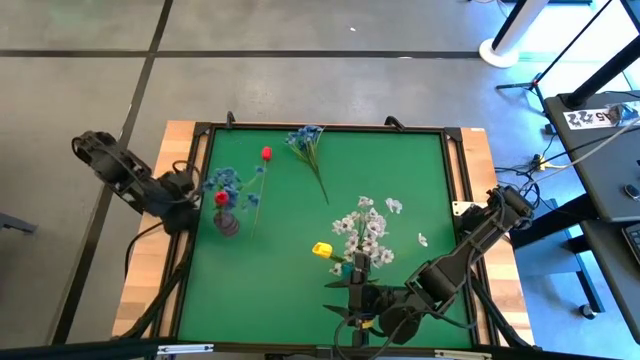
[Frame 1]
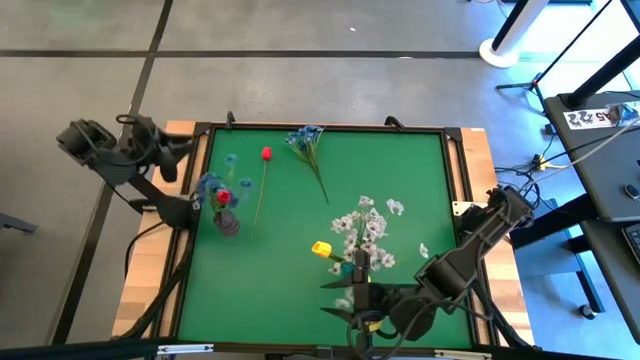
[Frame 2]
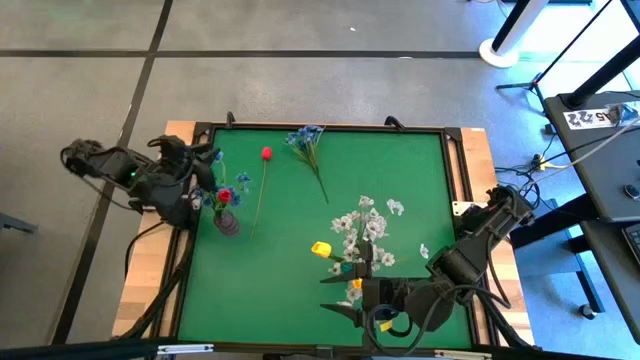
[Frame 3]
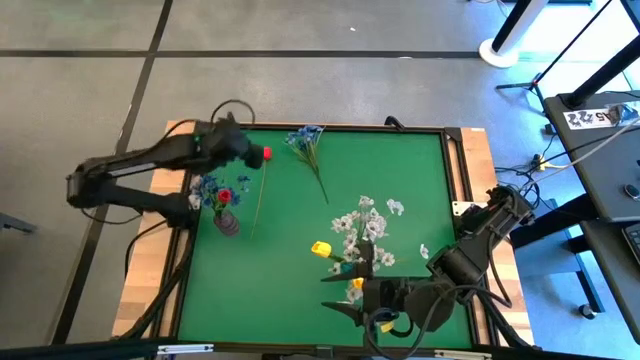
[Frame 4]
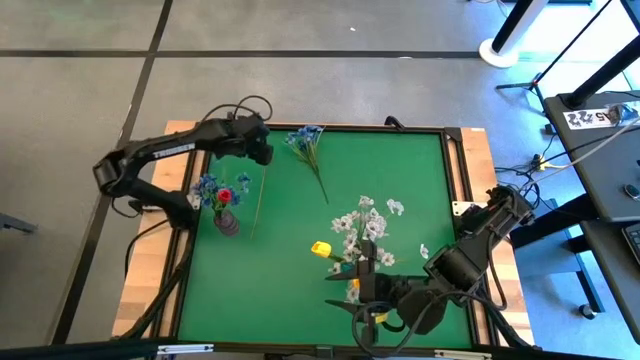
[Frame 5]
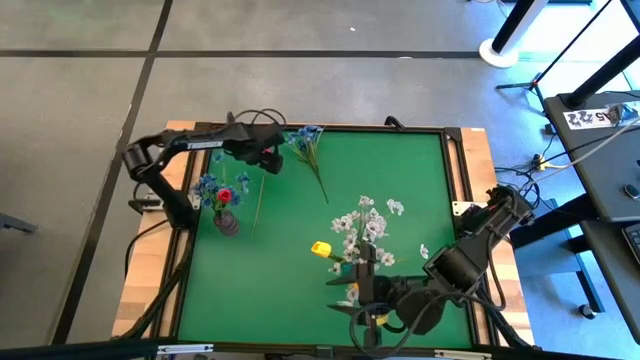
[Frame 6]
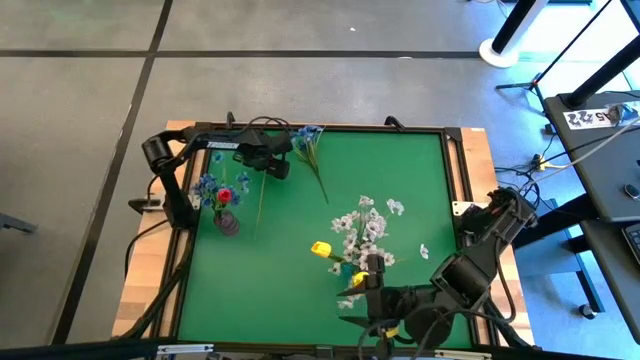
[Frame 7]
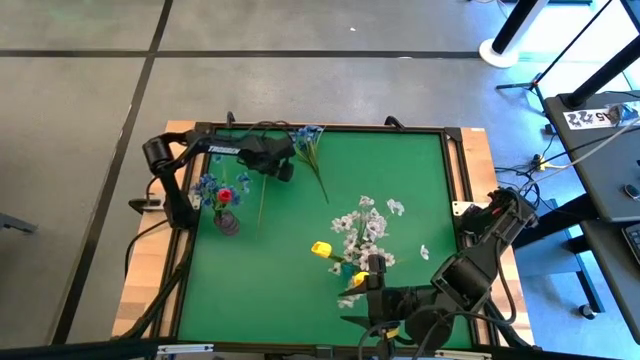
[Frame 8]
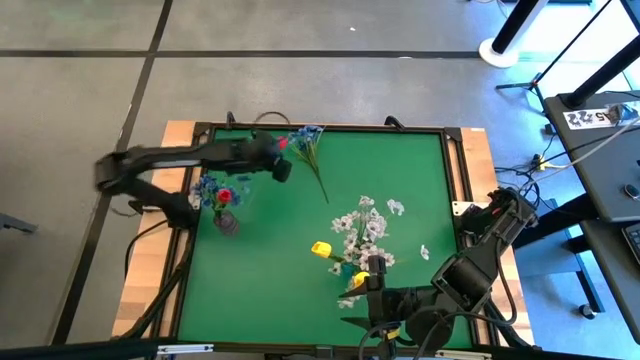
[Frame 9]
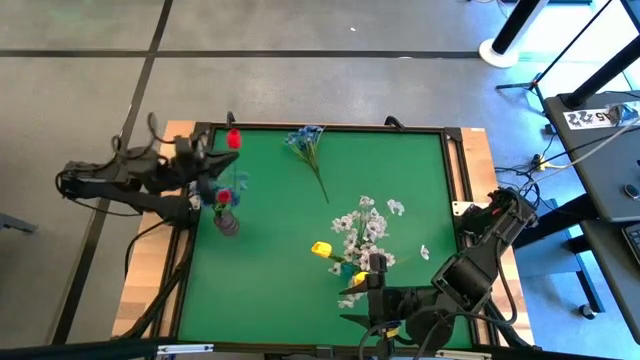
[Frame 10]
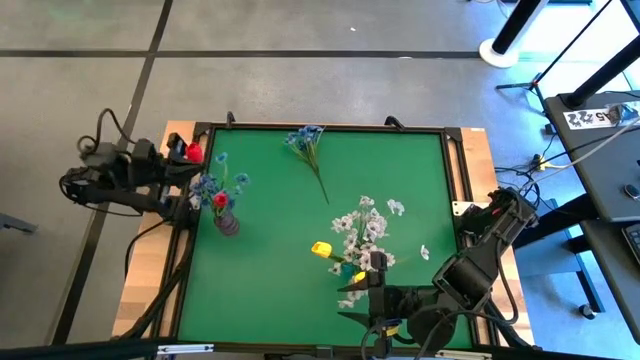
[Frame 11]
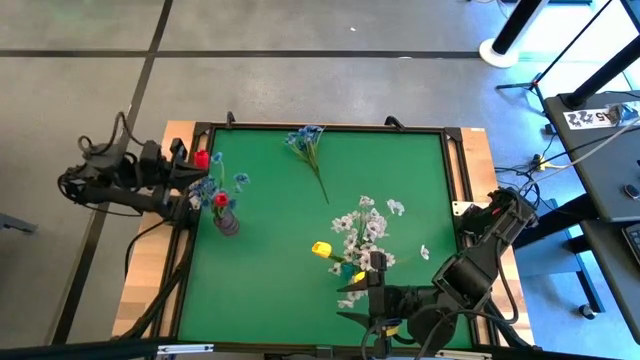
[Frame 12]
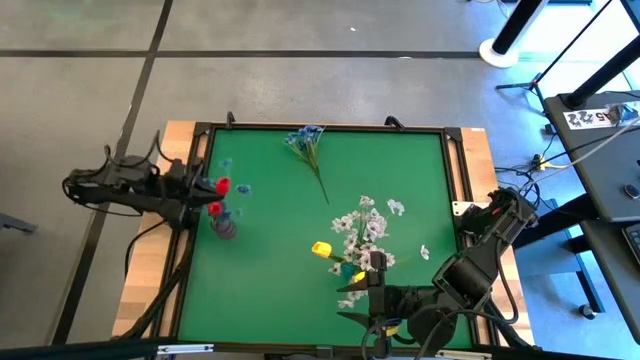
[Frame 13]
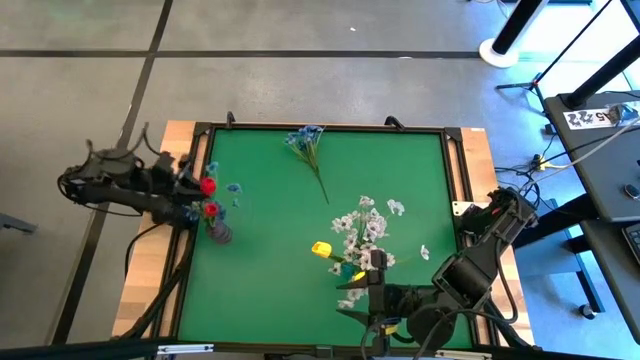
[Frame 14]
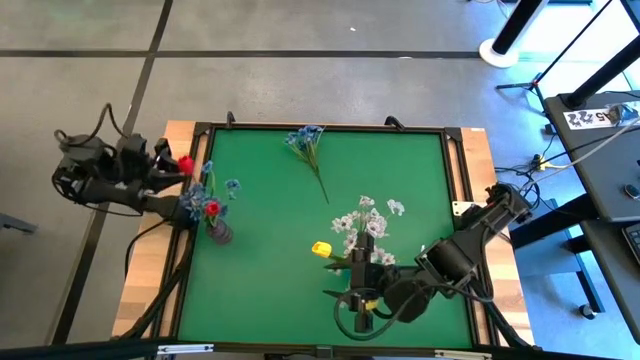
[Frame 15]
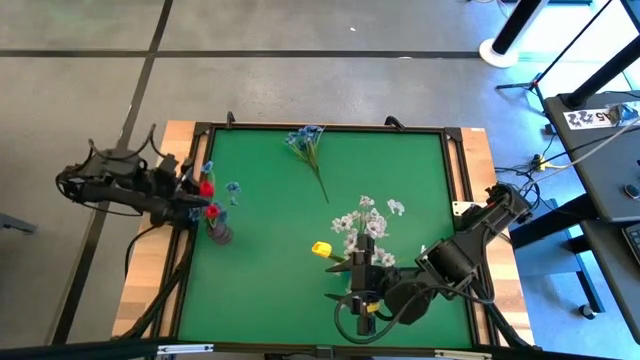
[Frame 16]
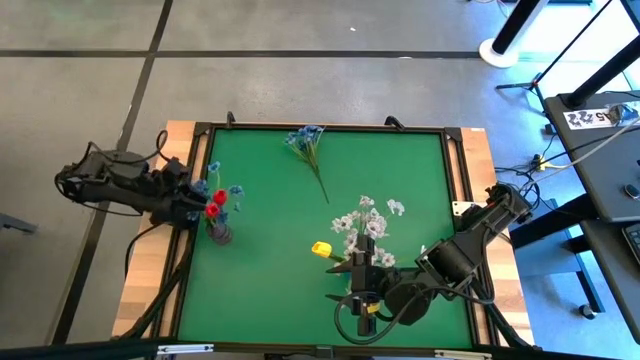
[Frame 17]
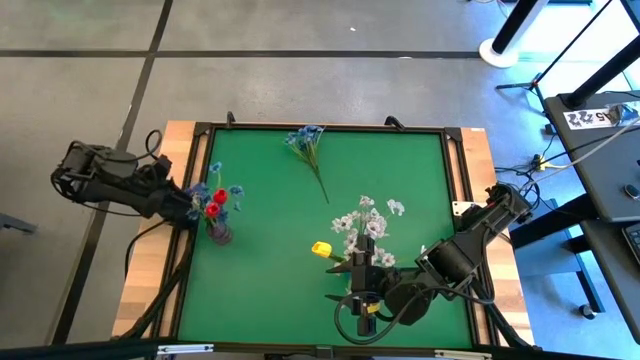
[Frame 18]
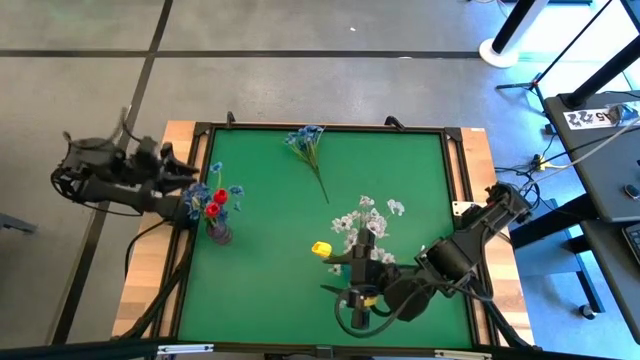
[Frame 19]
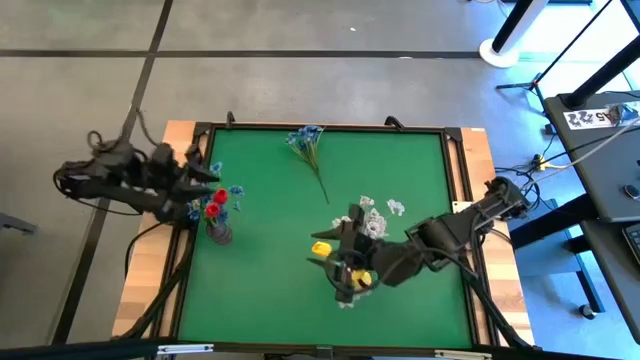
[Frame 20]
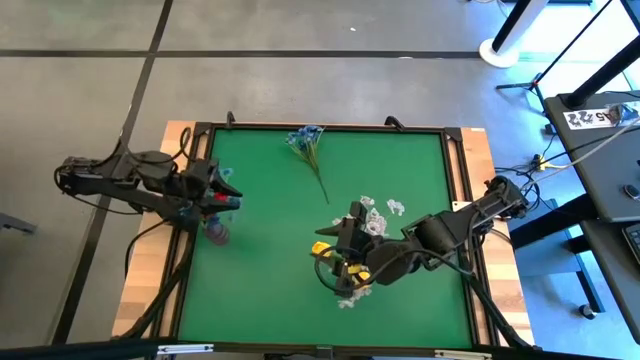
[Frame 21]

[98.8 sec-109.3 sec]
Task: Sort flowers into vase by color
Put the red flower into the purple vase

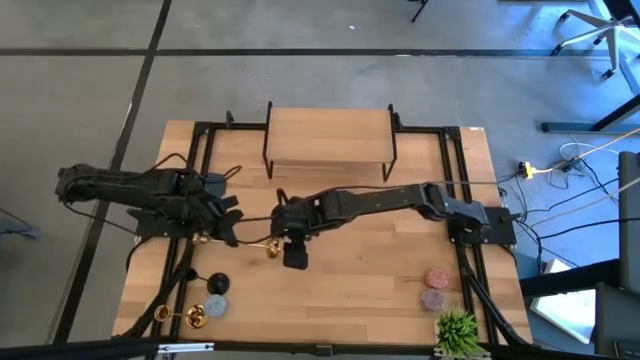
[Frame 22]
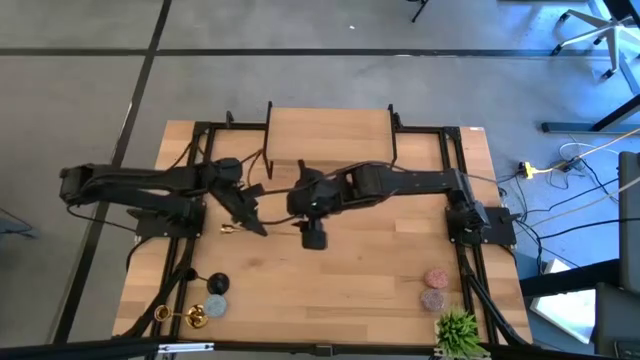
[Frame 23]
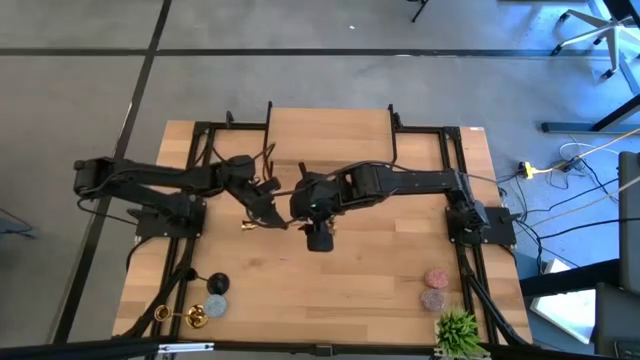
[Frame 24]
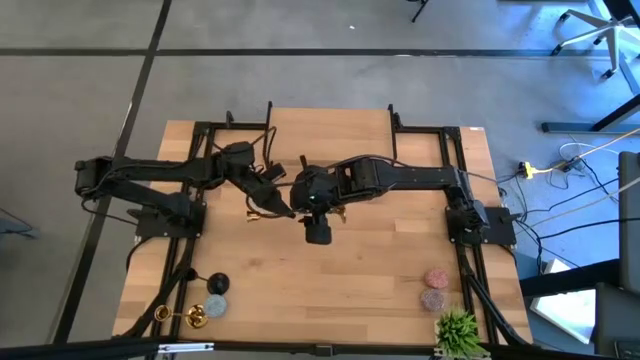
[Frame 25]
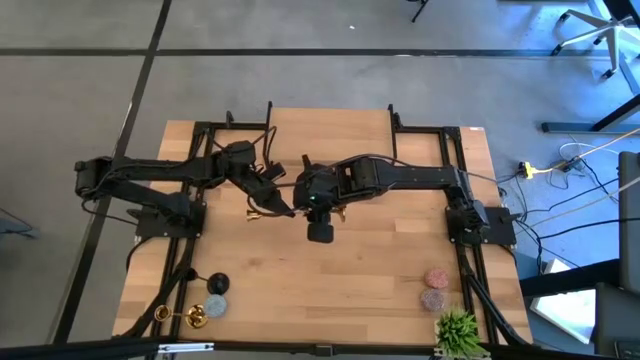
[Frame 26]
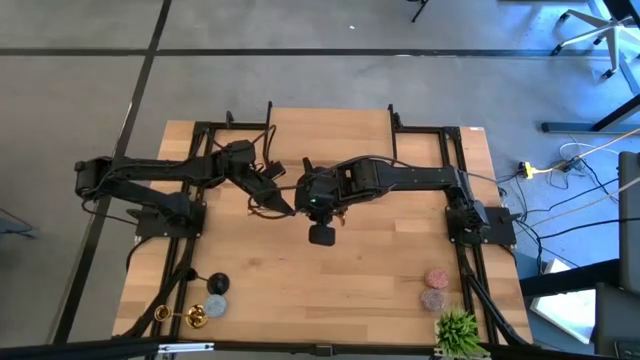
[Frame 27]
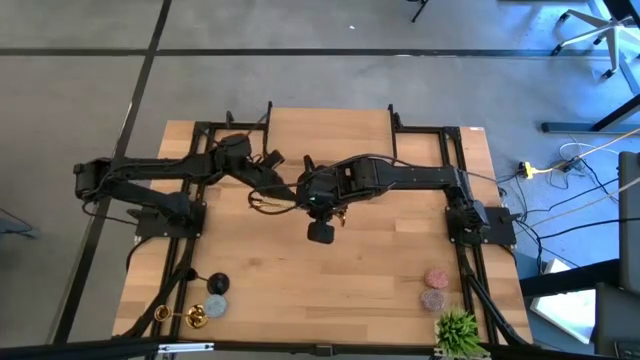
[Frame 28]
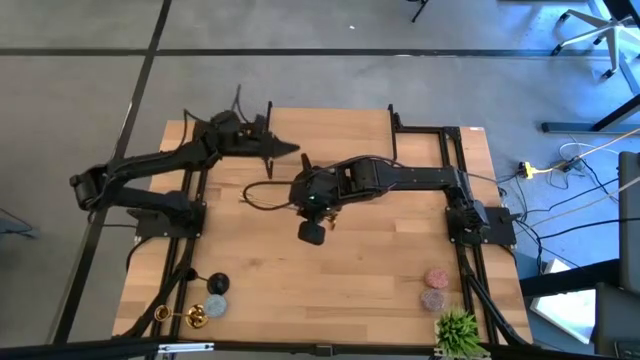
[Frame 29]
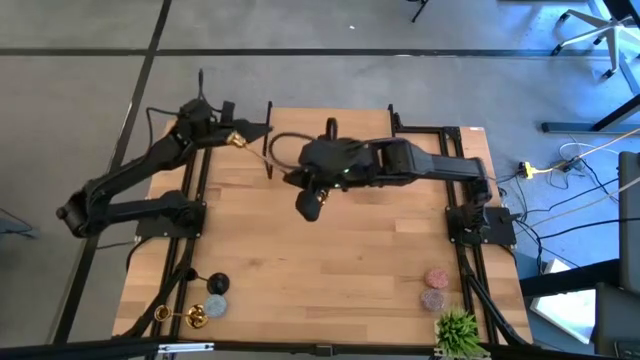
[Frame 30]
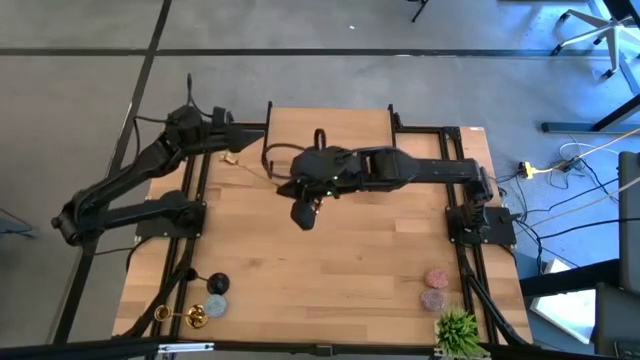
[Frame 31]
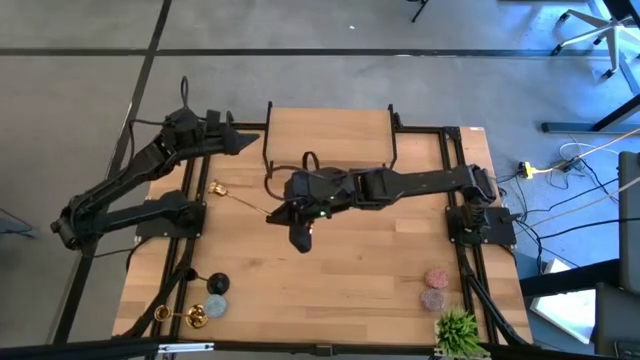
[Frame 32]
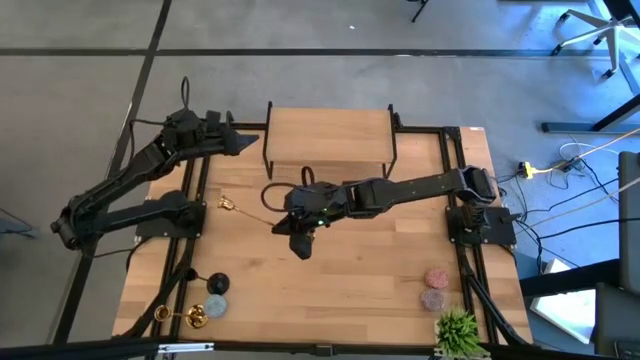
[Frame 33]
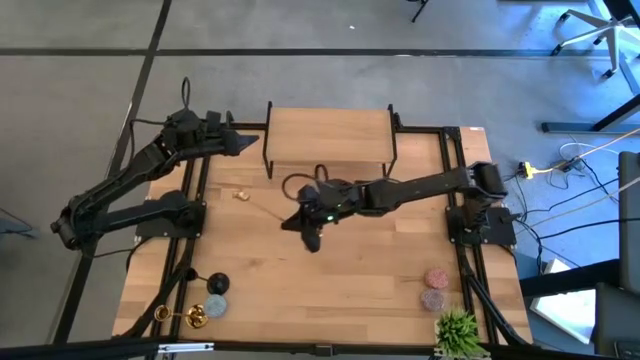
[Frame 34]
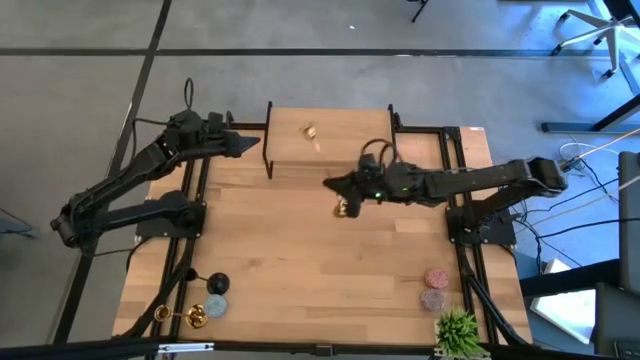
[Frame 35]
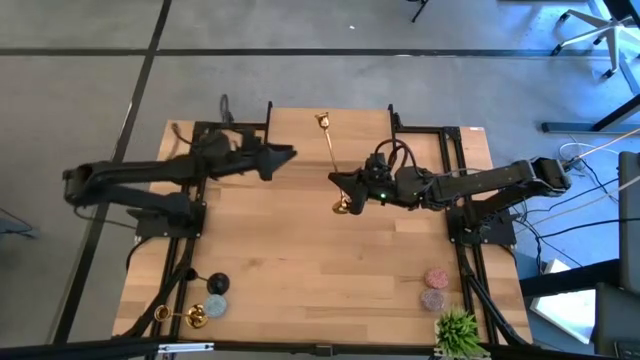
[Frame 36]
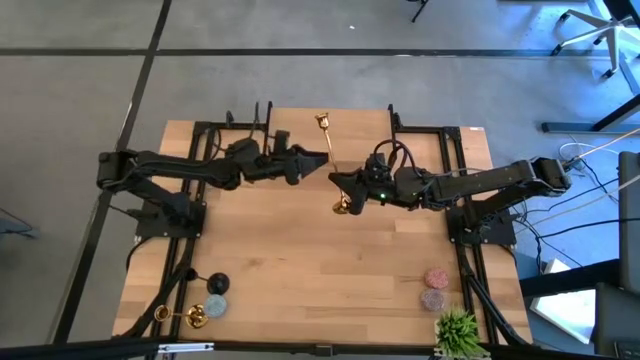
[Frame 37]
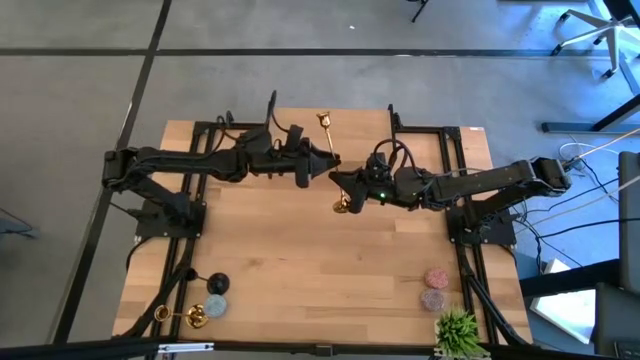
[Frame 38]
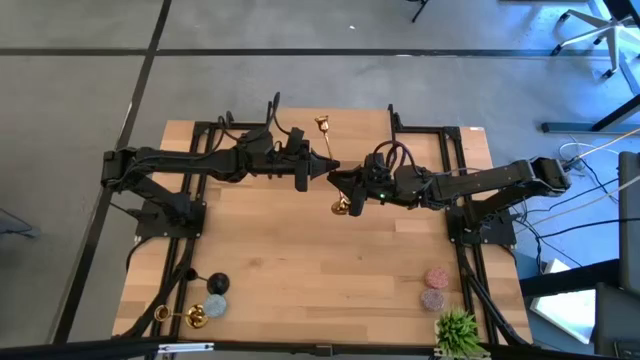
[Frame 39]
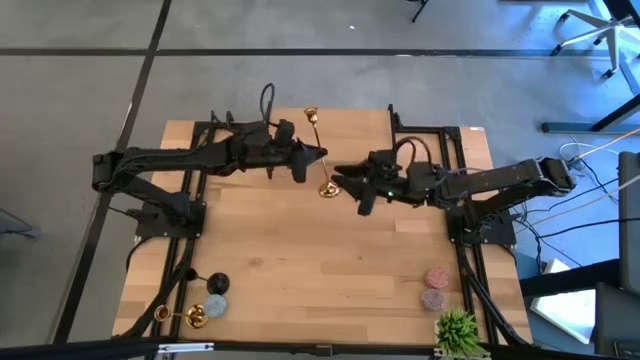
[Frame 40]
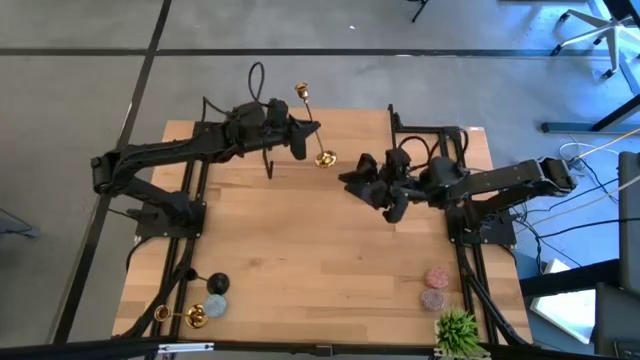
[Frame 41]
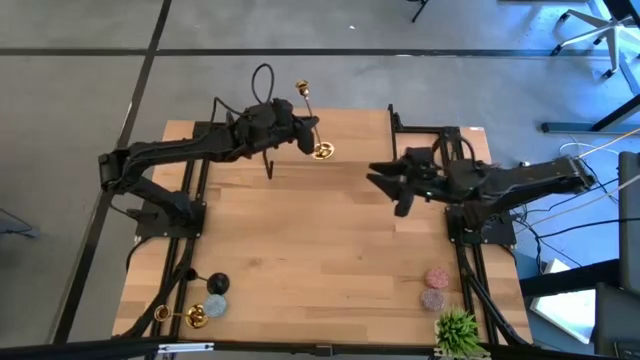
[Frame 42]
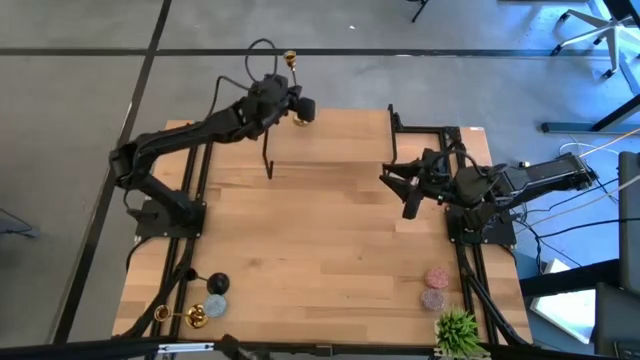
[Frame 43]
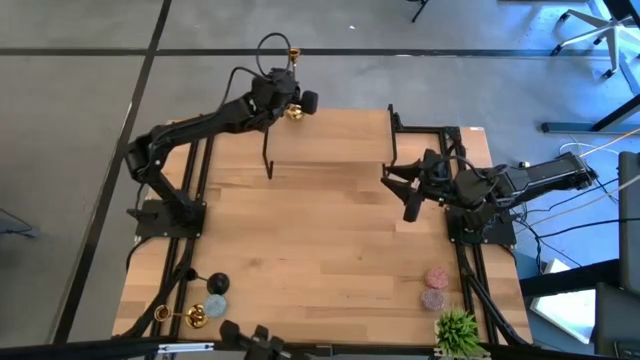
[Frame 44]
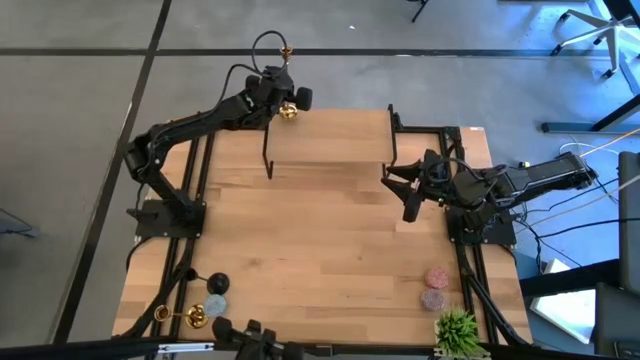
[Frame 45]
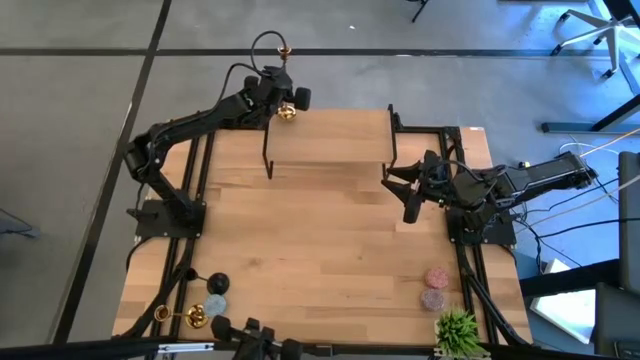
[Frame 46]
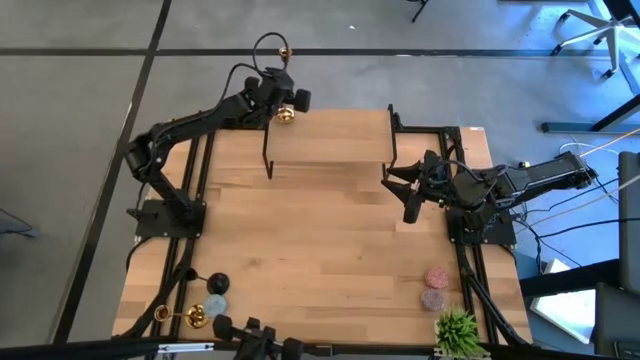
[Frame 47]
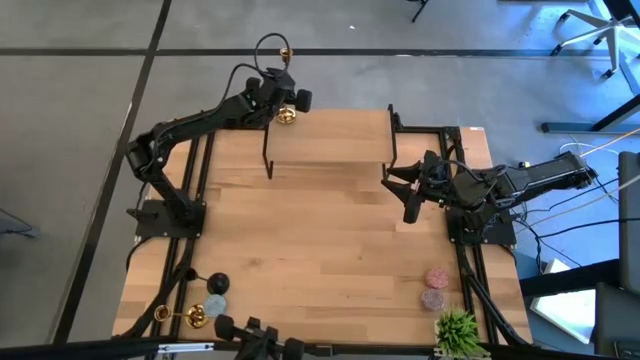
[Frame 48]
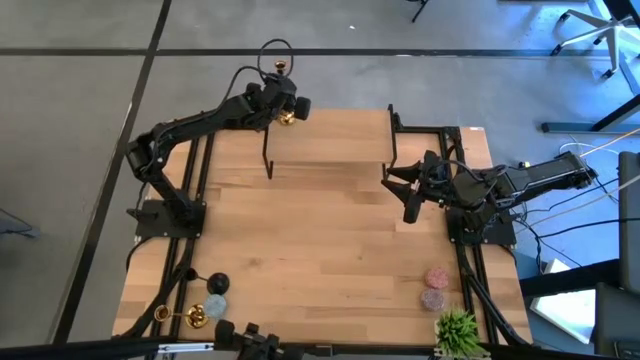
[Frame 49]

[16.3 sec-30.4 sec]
Task: Pick & Place candle stick holders
Put the gold brass candlestick on the shelf
